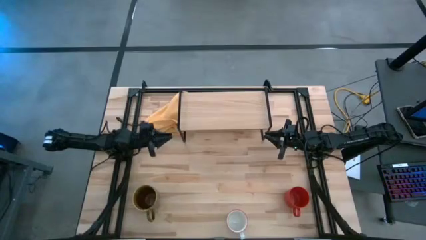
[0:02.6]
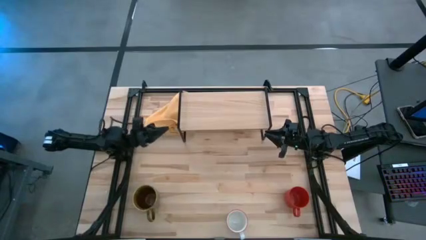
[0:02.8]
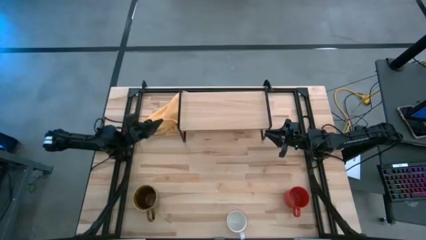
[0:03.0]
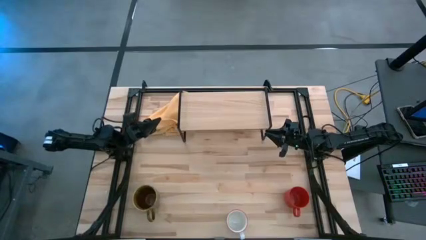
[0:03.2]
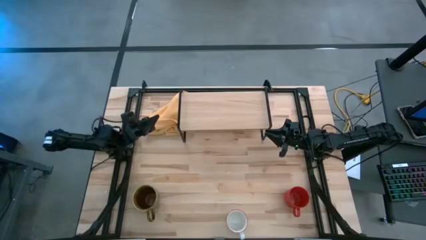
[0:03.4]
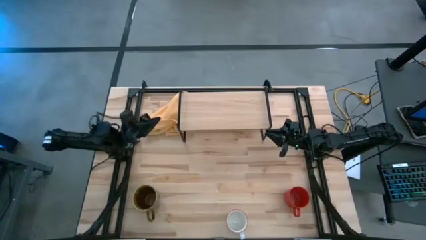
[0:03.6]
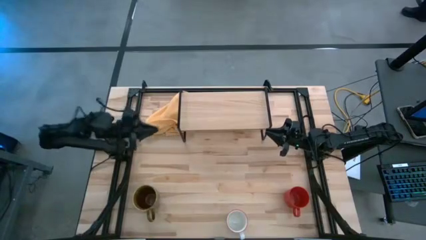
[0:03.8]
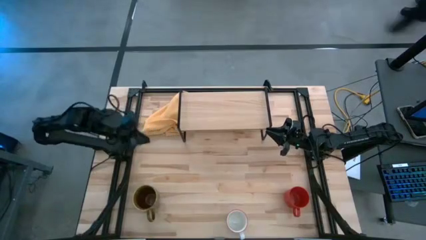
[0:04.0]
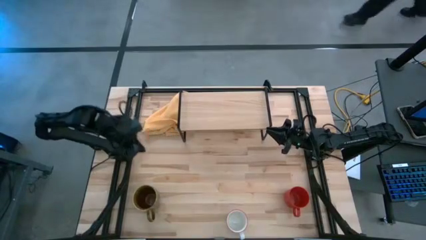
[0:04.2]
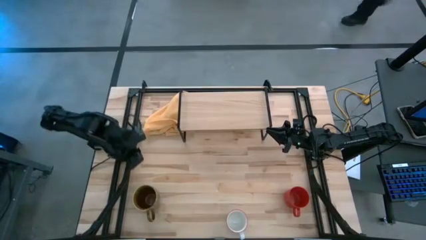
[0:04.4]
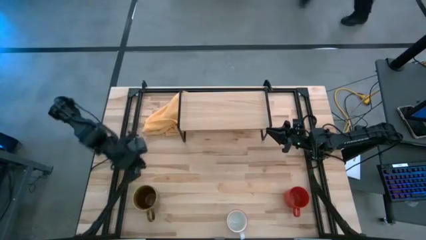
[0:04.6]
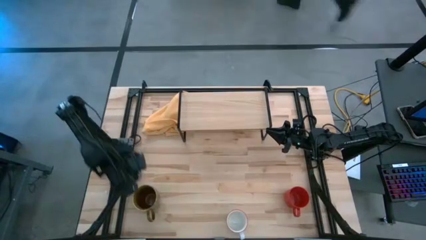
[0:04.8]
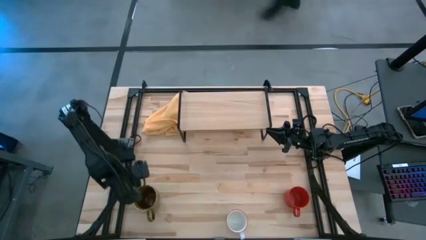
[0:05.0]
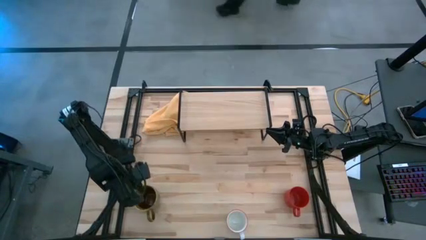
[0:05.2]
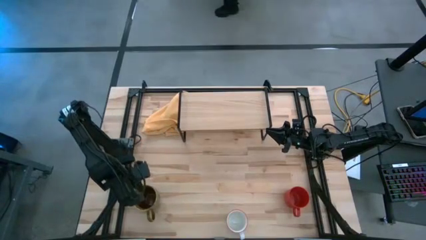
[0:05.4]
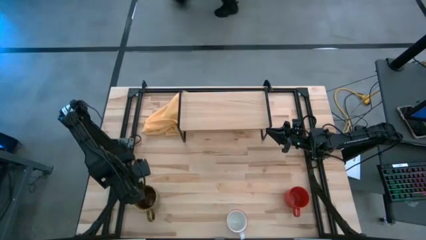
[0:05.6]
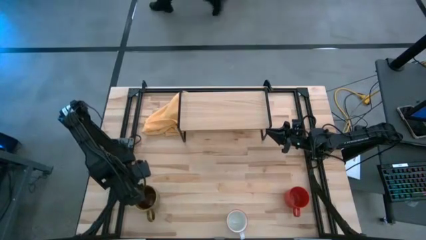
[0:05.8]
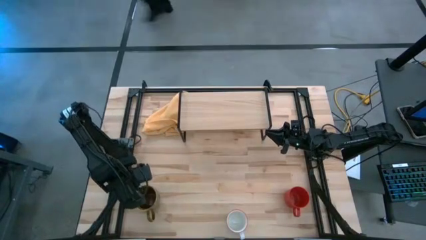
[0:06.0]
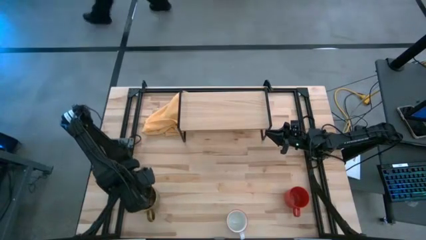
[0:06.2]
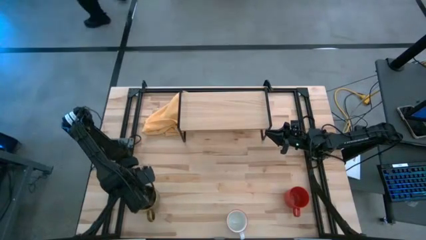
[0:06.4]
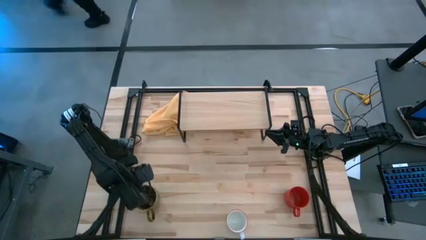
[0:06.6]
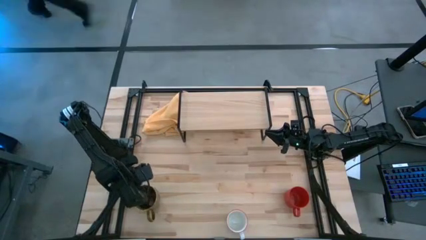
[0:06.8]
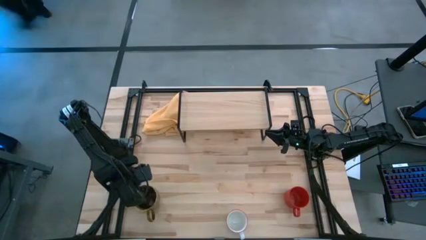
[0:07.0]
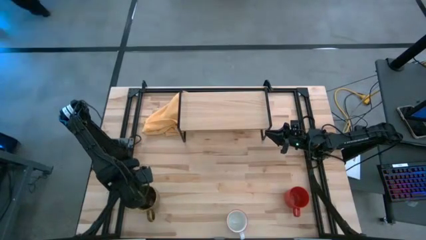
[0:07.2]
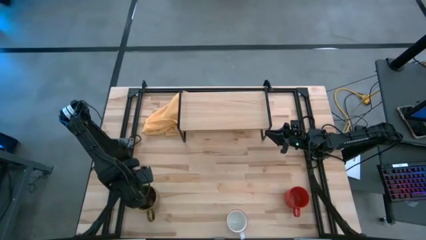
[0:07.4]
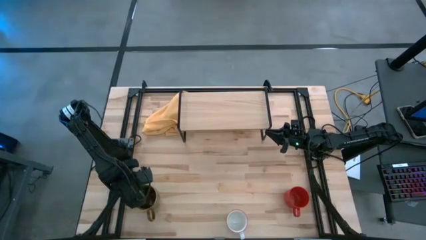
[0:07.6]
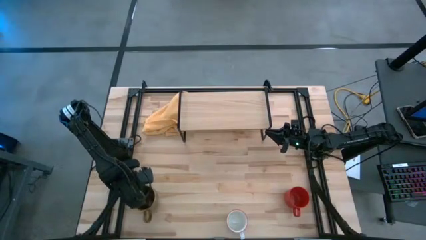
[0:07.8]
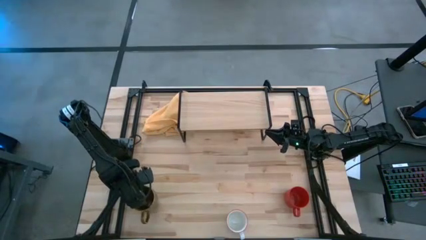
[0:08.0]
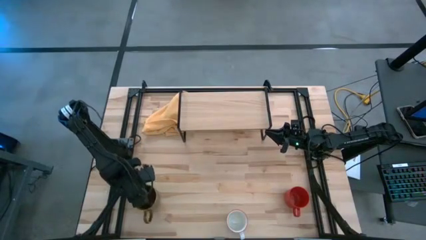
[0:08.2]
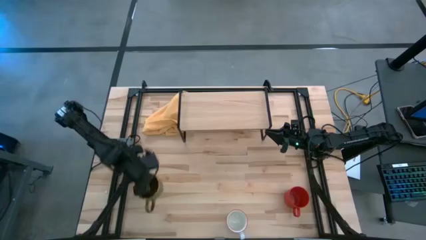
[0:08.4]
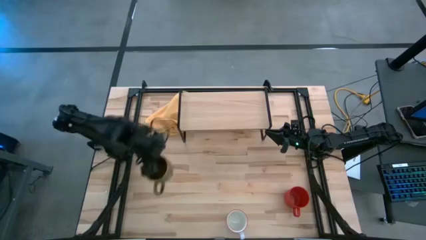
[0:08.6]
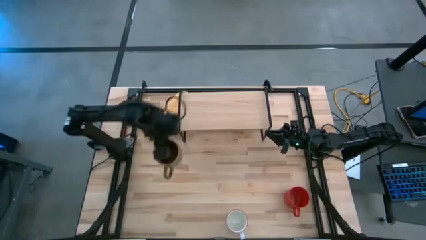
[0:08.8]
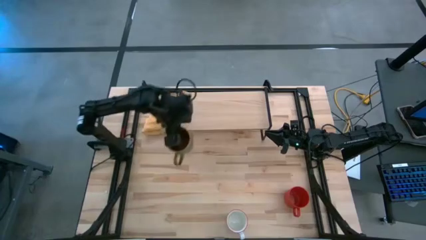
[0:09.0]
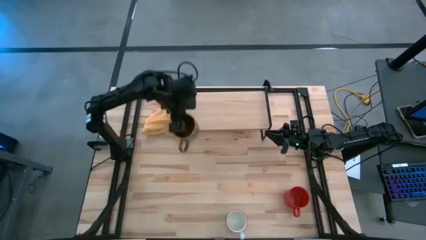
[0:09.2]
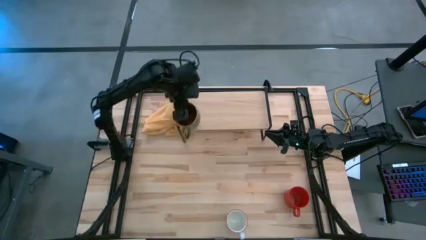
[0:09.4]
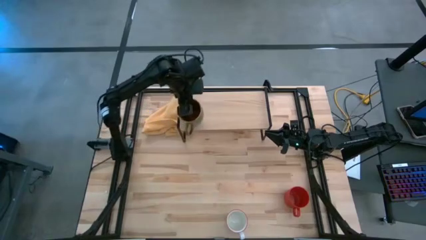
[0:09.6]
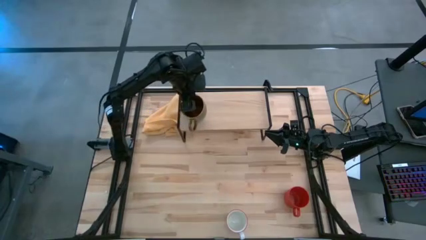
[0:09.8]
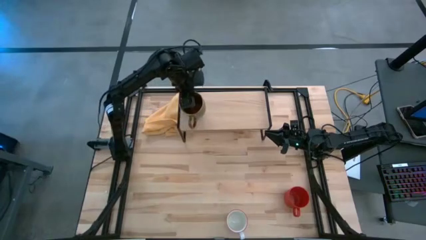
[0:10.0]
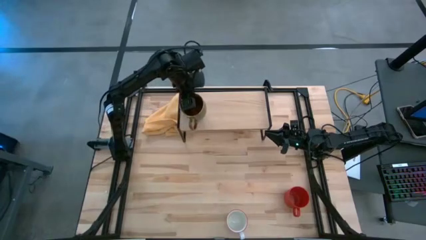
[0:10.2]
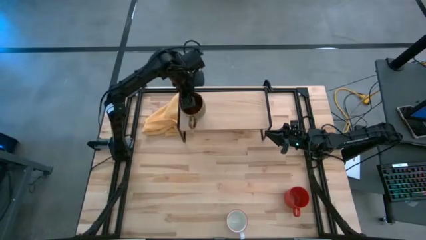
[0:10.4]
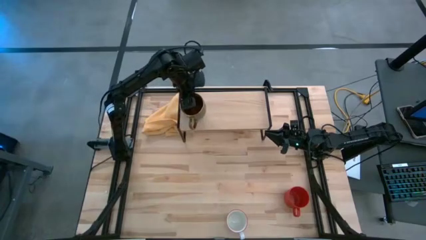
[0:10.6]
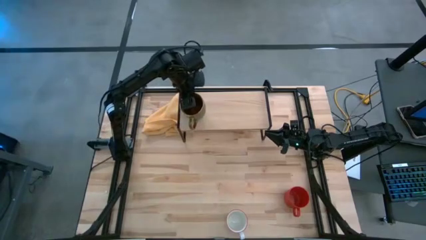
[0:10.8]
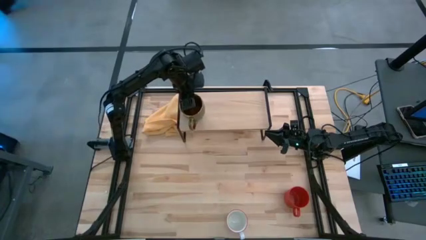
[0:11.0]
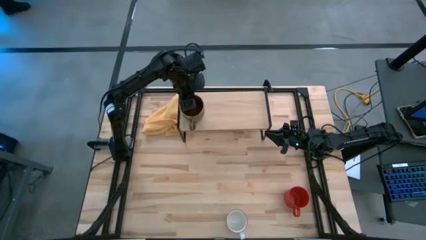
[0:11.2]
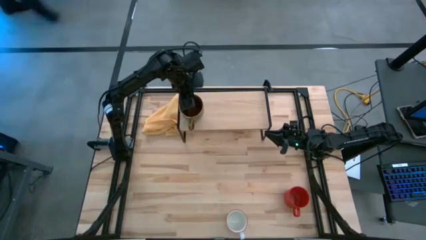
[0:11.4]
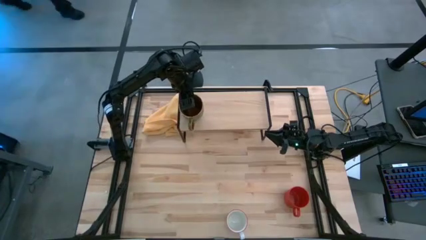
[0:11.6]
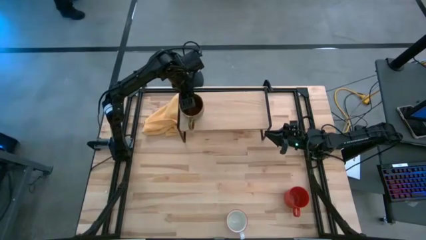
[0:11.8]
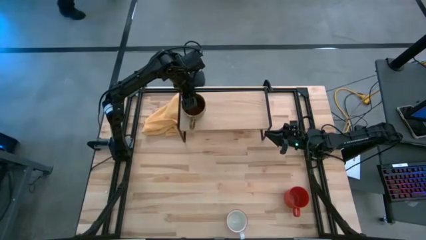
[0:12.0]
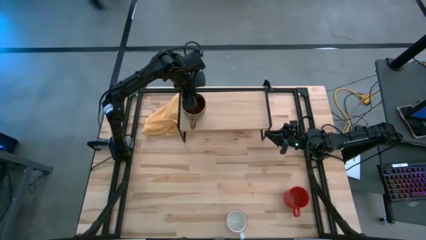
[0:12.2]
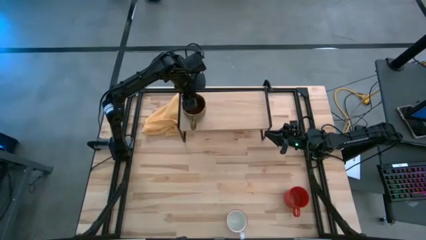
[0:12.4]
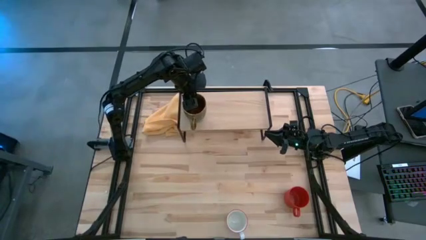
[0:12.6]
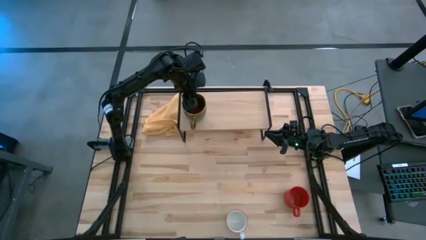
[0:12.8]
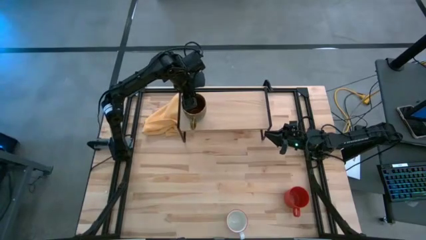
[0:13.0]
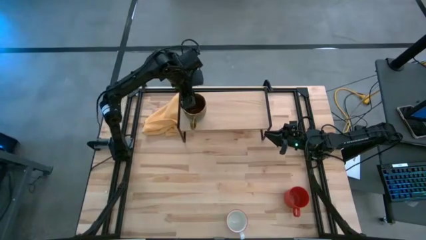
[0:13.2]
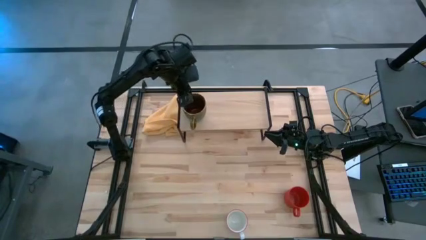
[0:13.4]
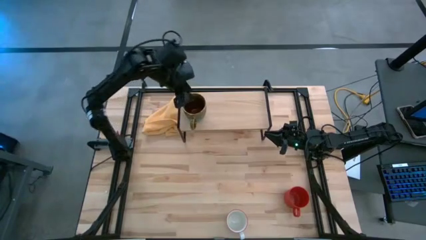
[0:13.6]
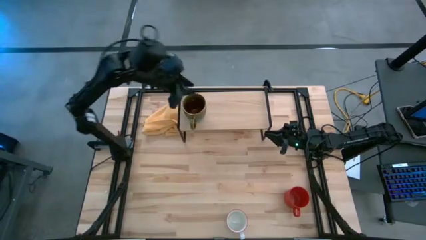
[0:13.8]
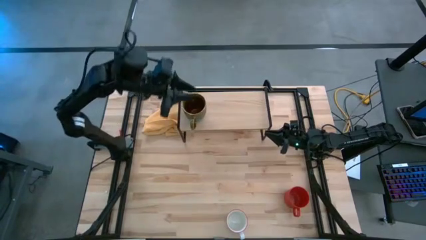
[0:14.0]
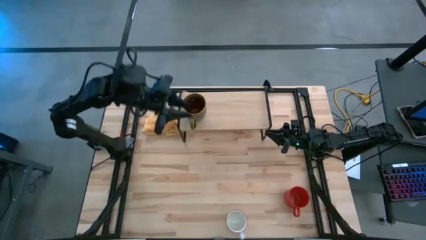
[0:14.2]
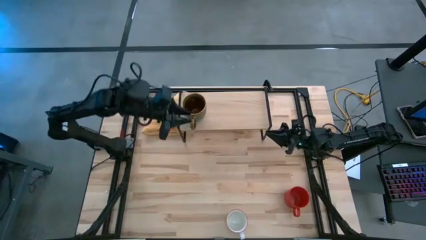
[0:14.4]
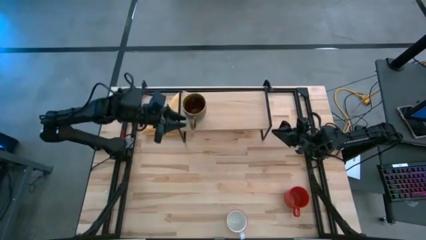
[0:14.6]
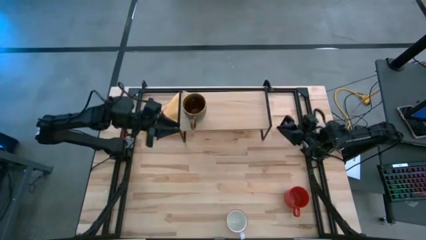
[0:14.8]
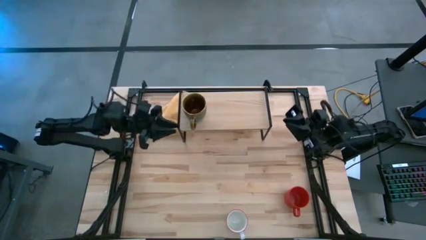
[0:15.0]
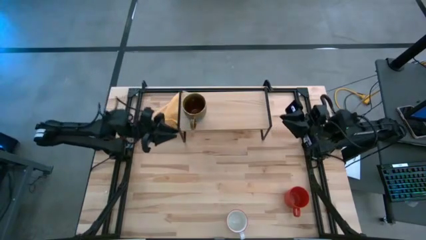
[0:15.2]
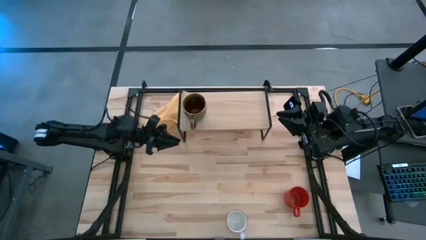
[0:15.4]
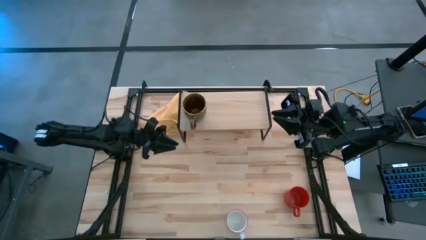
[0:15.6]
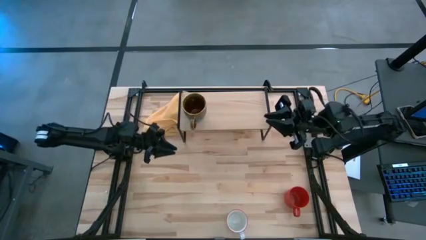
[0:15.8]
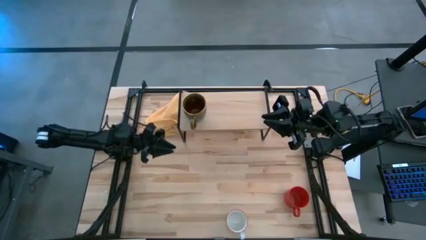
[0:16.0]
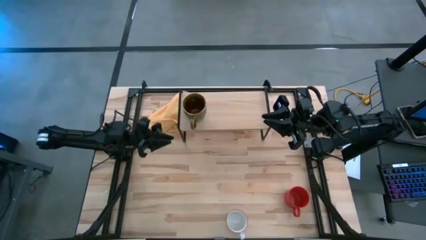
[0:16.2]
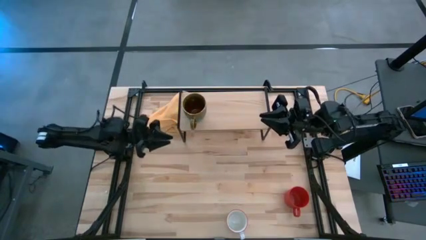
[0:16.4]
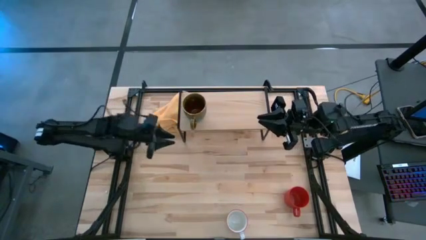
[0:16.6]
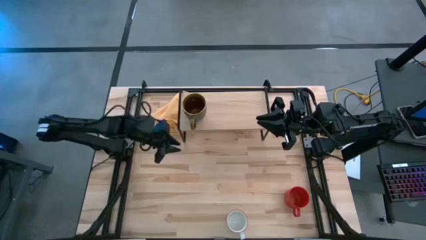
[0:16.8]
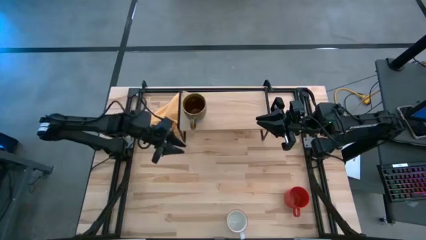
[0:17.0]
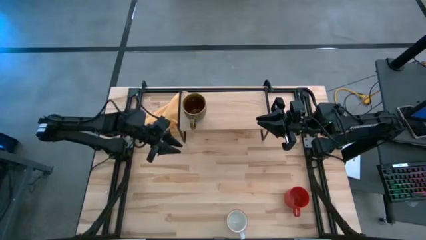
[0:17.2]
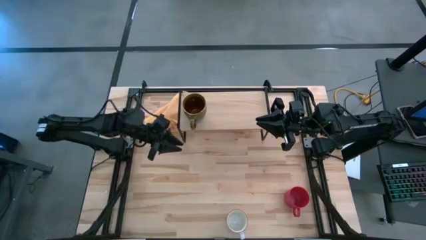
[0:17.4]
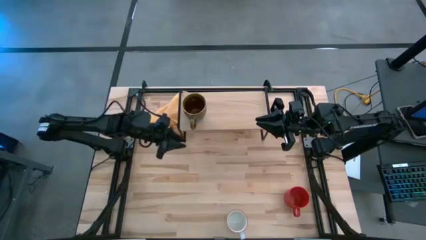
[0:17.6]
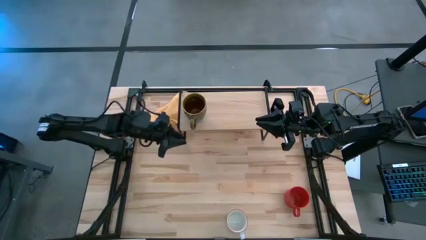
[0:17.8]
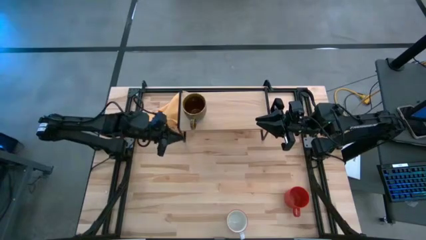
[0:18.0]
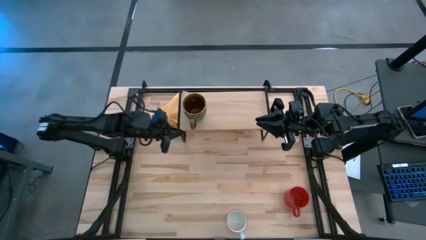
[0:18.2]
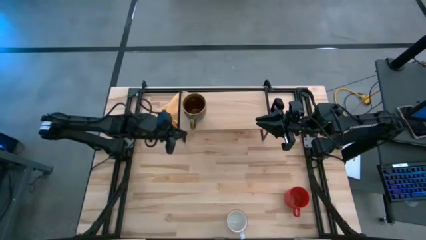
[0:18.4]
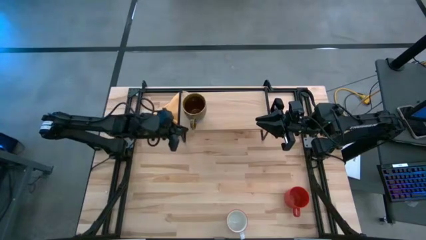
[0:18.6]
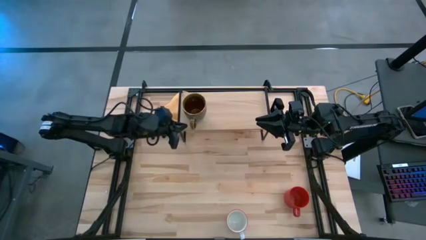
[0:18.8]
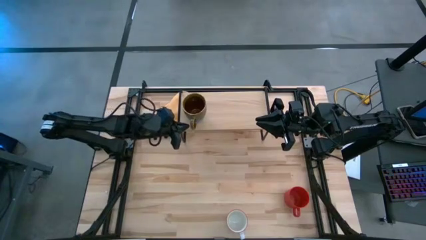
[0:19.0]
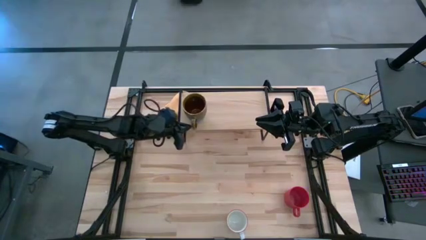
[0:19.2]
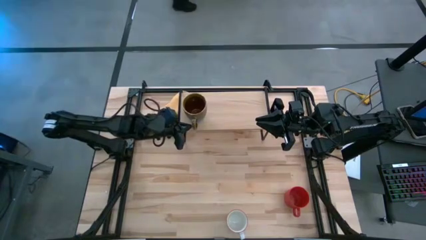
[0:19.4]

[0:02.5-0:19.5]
Task: Stack small to large cups/mugs on shelf
Put the brown mug on the shelf
